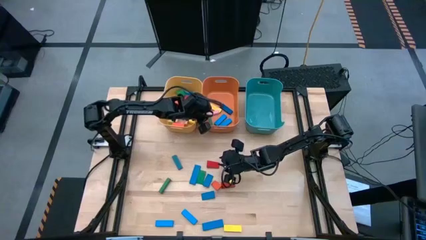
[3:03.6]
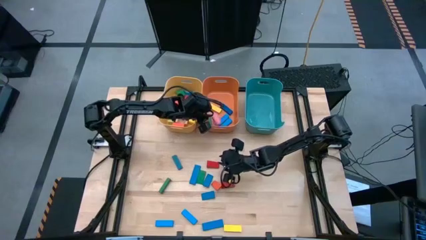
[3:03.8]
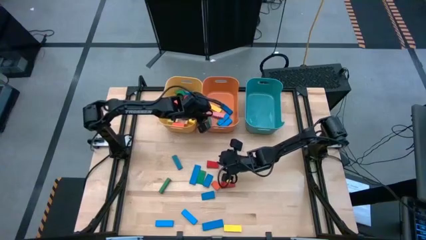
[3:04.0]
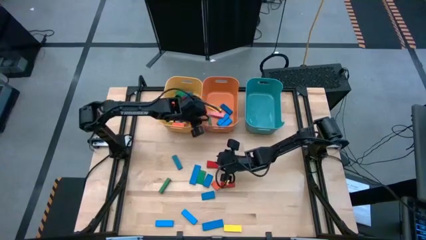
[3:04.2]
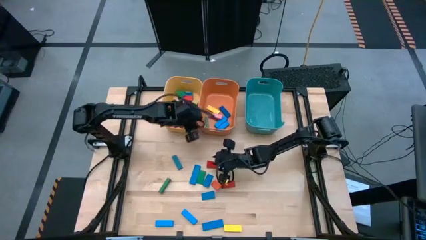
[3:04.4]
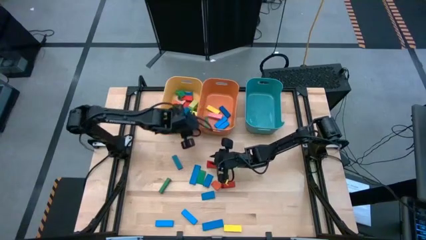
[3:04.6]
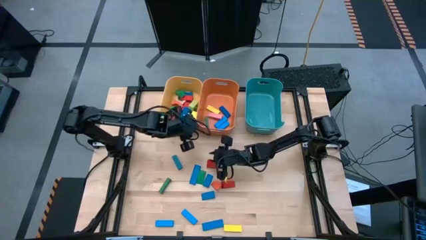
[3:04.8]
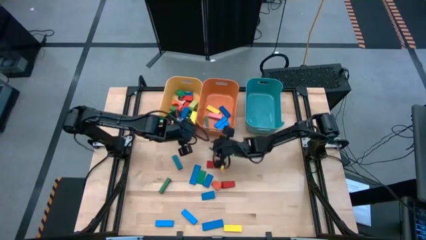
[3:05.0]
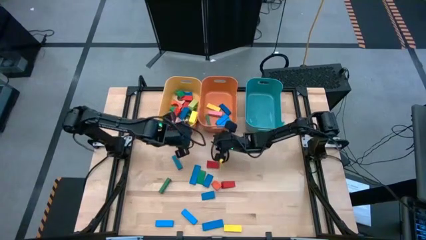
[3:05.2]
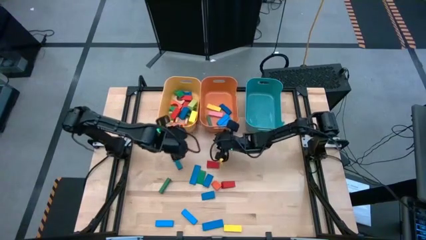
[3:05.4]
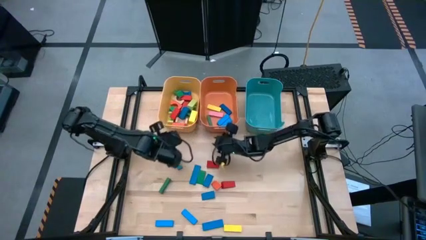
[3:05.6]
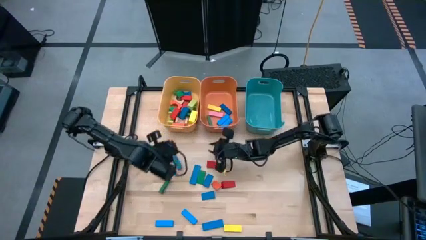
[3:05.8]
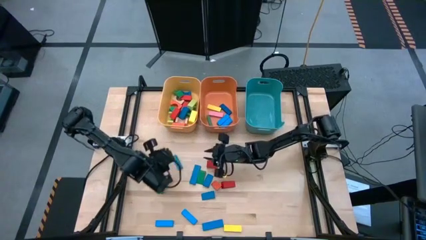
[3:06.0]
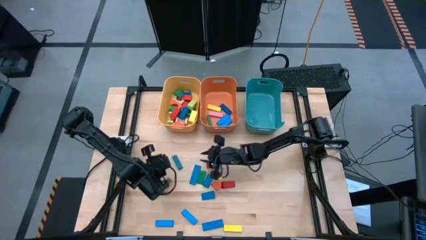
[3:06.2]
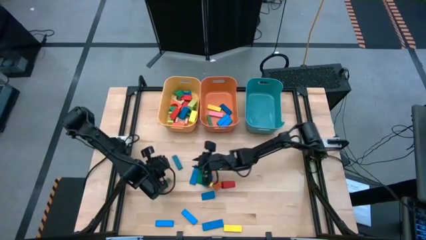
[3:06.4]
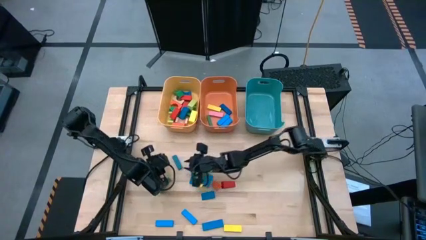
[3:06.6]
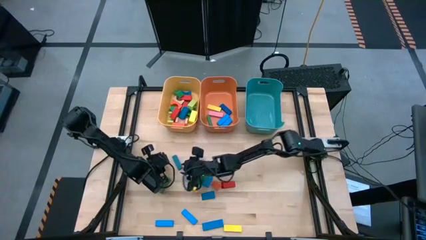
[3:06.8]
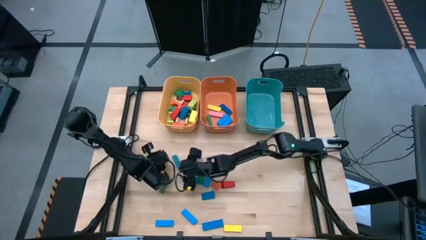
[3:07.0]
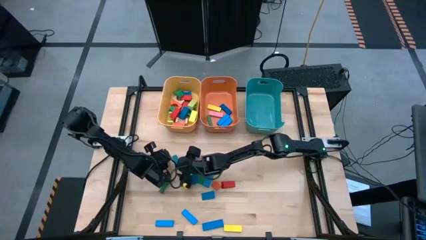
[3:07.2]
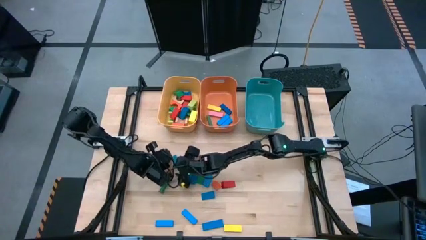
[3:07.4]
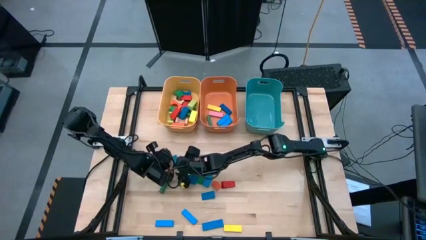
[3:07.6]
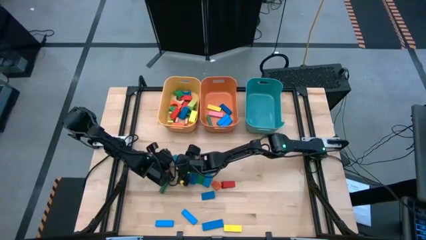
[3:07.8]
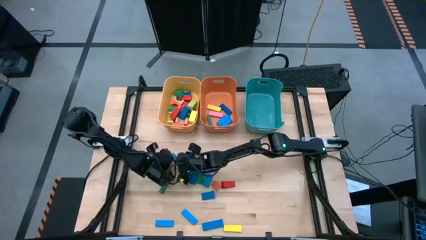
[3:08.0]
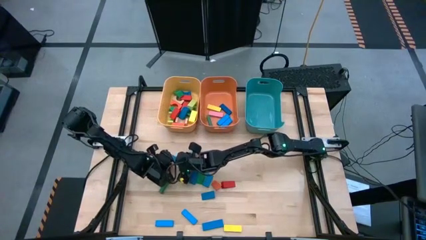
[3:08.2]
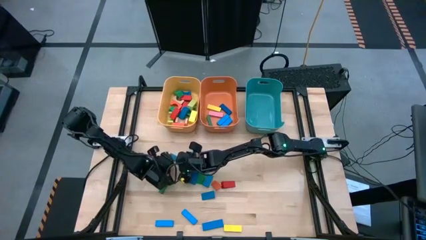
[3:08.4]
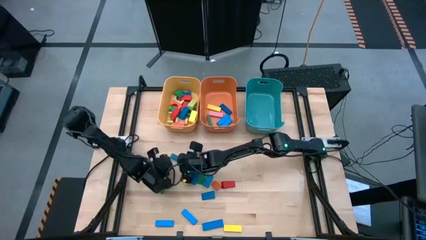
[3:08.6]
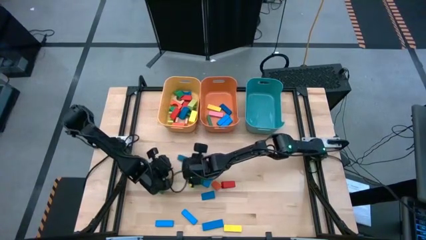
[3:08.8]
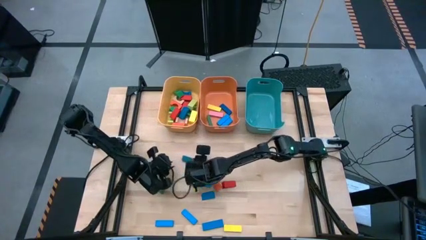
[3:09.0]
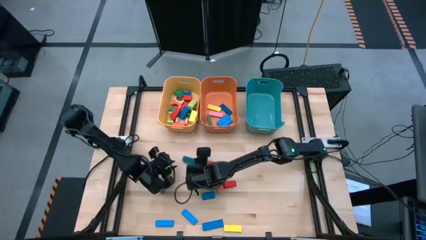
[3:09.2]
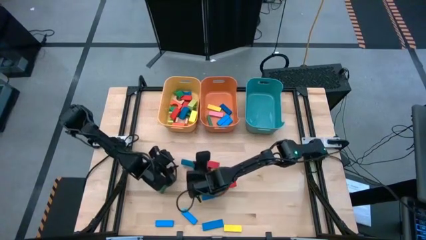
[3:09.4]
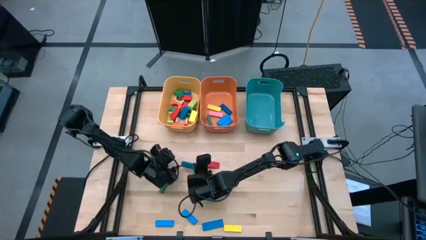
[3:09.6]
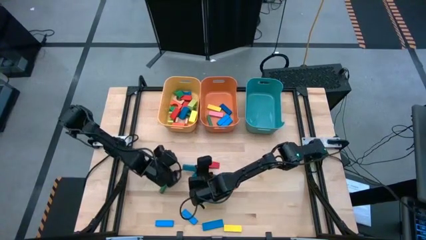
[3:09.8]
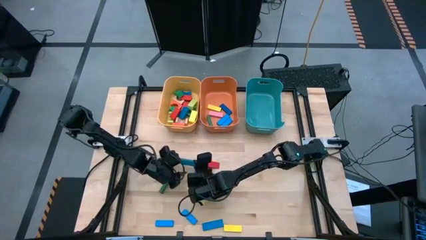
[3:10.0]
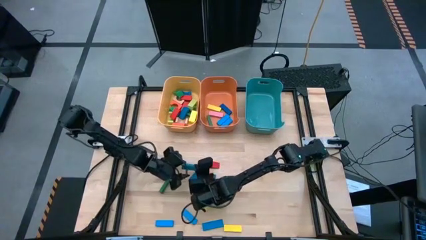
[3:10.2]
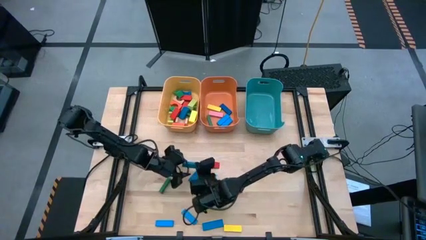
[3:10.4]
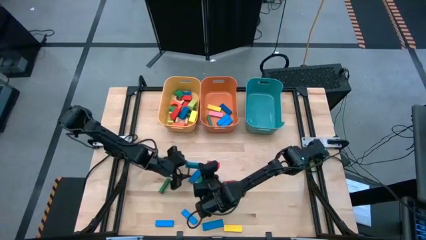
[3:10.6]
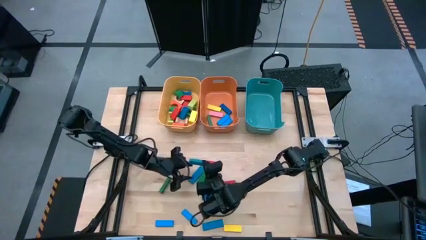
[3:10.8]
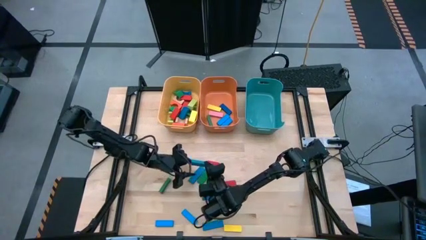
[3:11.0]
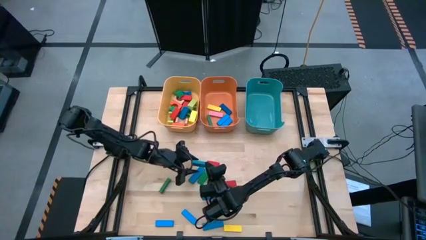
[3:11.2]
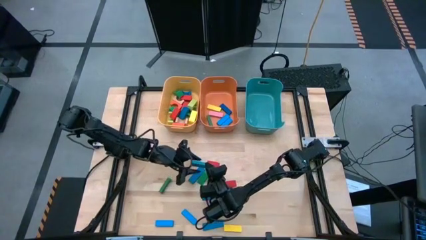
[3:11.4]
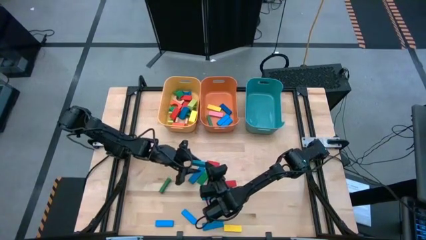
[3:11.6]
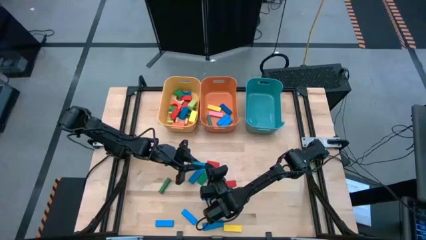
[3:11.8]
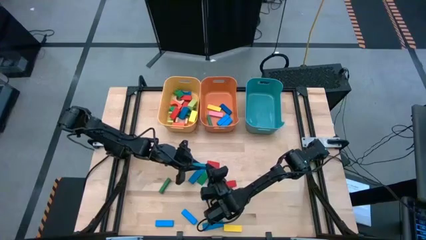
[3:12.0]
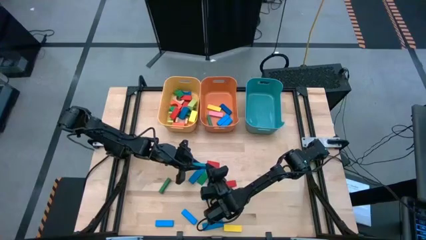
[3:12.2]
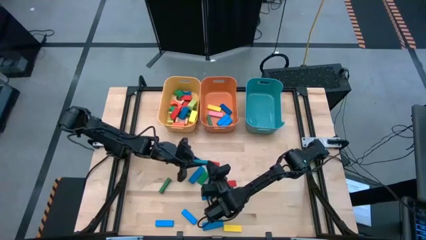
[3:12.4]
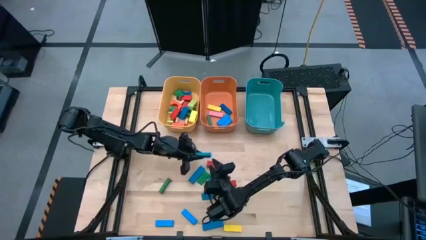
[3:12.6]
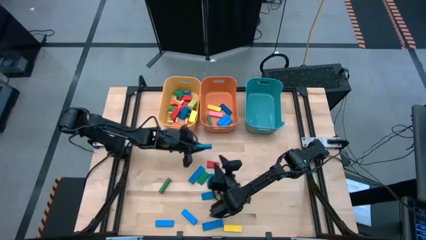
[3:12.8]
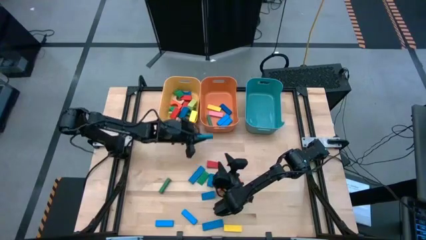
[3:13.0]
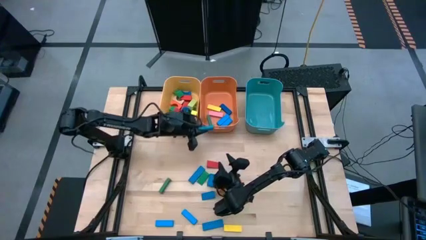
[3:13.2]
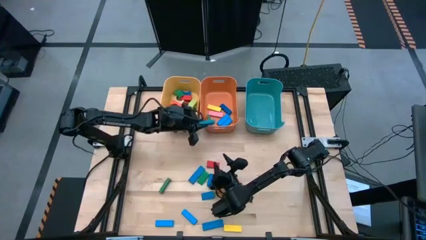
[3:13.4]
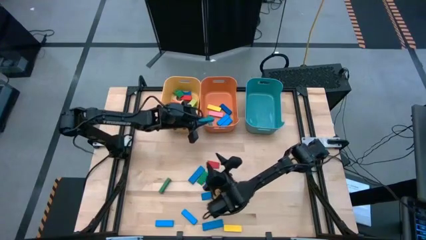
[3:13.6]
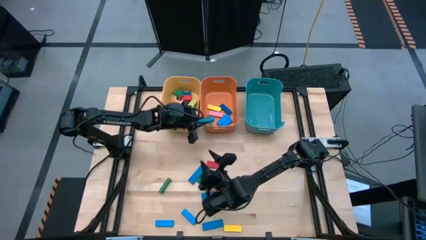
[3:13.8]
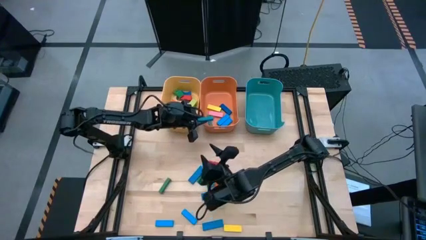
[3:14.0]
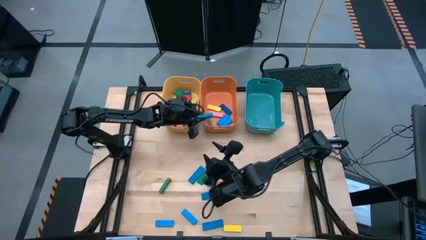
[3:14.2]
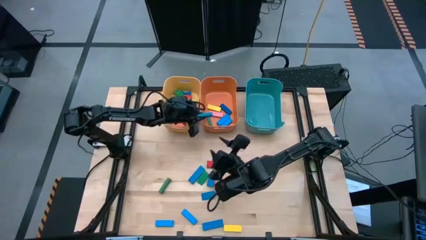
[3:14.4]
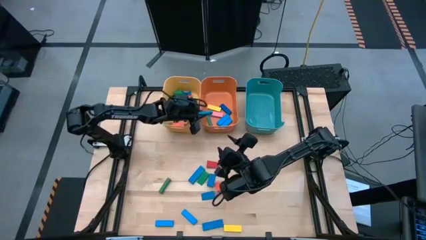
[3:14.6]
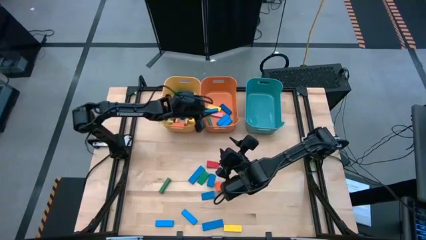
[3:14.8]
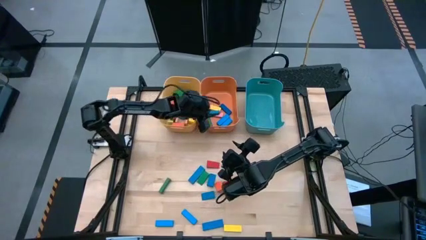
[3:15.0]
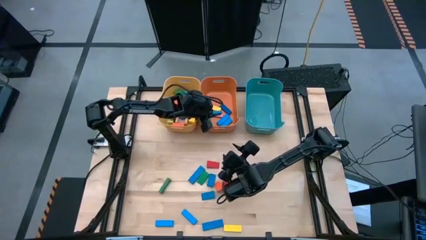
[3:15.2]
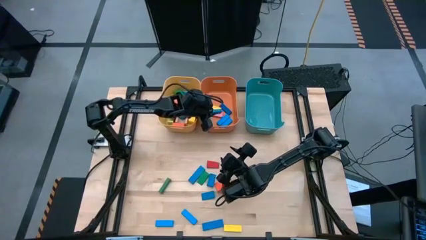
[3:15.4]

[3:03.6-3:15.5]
Task: Sort blocks by size
Put the blue rectangle block into the orange bin

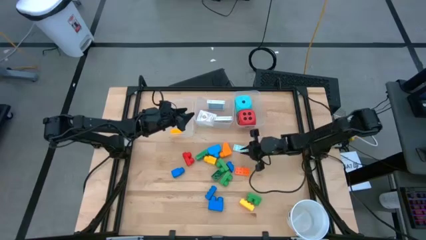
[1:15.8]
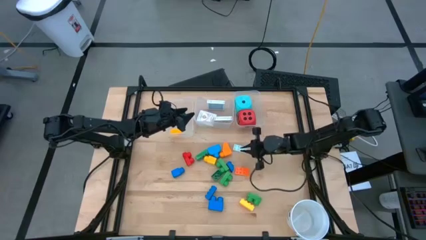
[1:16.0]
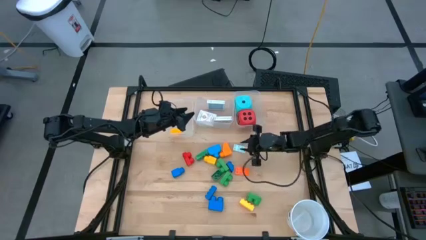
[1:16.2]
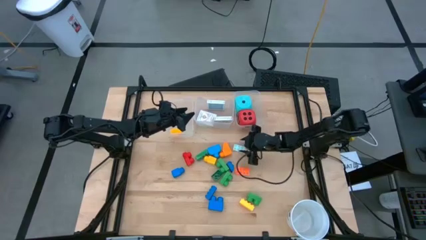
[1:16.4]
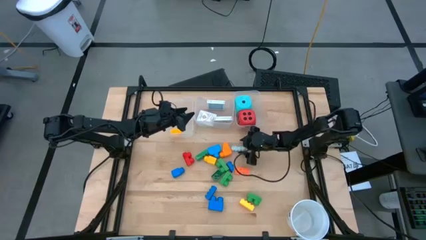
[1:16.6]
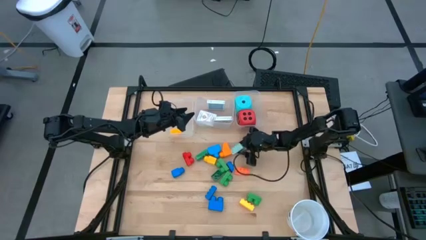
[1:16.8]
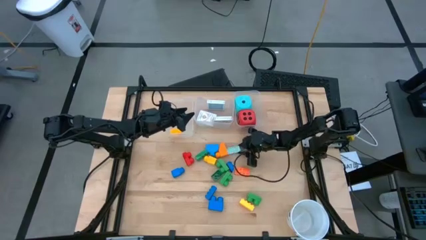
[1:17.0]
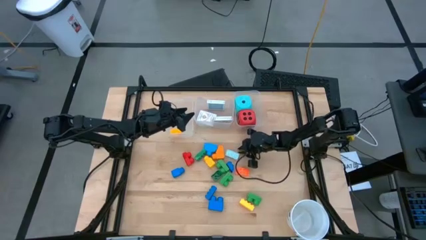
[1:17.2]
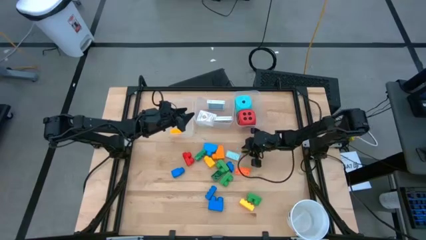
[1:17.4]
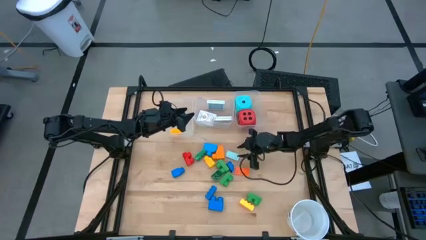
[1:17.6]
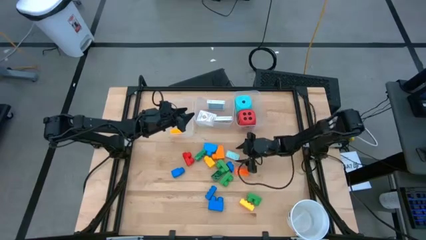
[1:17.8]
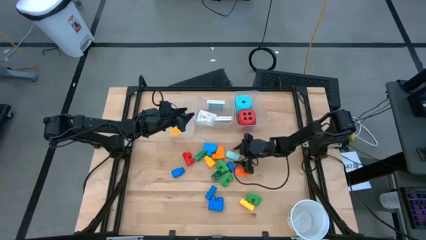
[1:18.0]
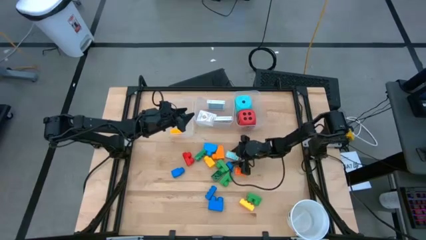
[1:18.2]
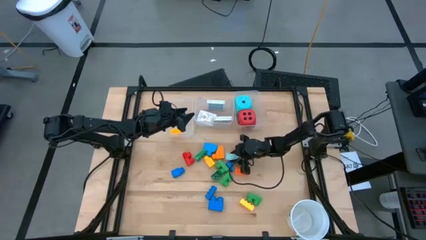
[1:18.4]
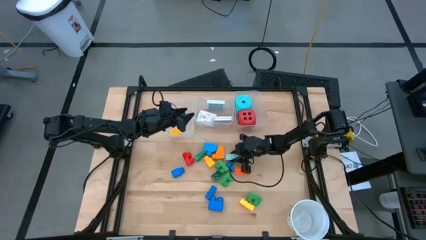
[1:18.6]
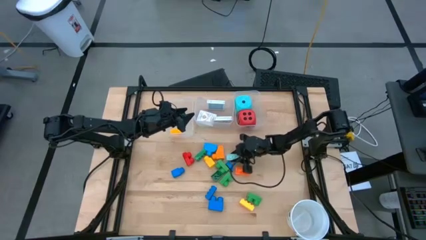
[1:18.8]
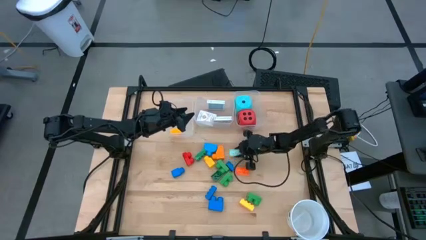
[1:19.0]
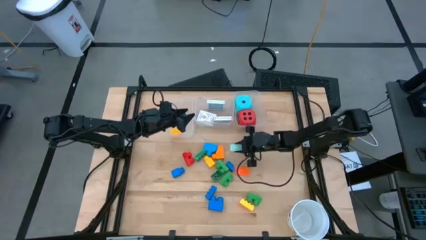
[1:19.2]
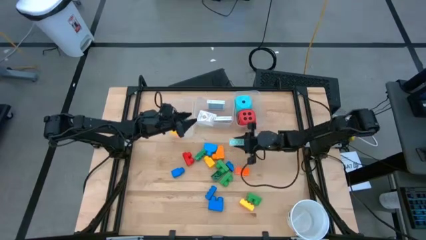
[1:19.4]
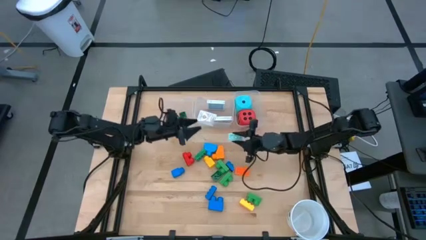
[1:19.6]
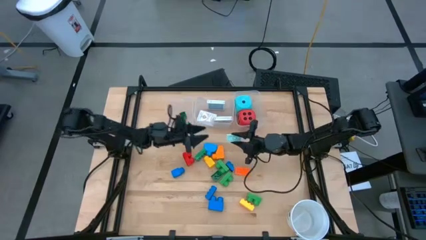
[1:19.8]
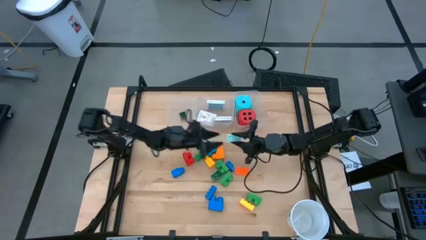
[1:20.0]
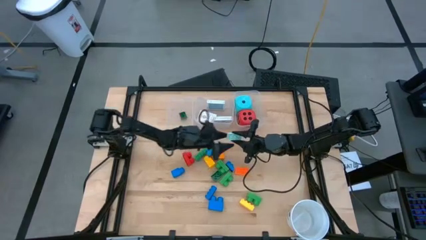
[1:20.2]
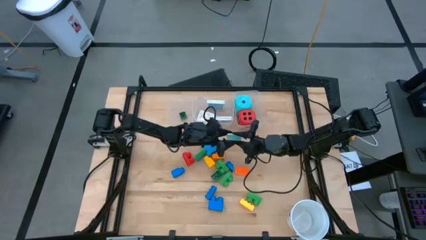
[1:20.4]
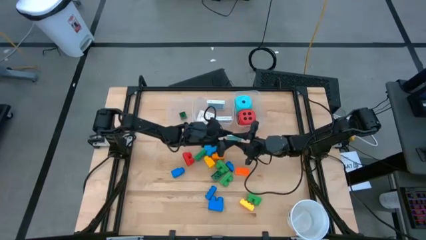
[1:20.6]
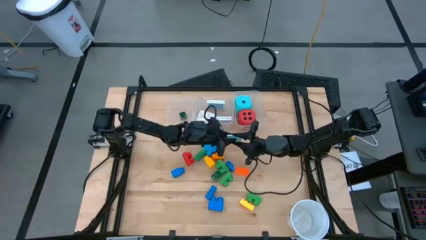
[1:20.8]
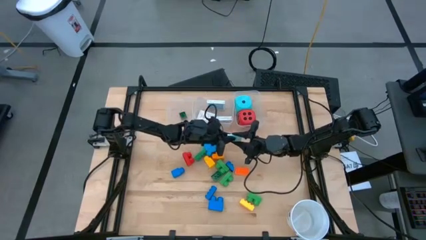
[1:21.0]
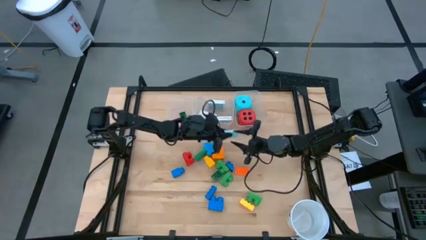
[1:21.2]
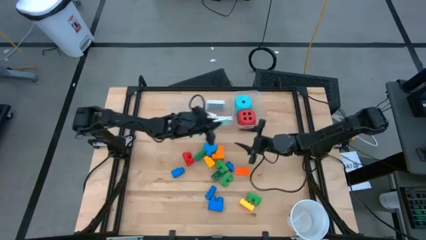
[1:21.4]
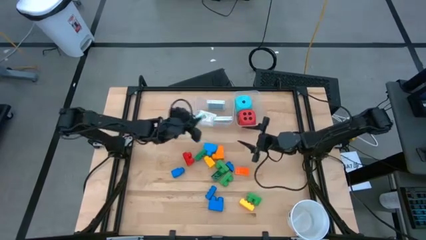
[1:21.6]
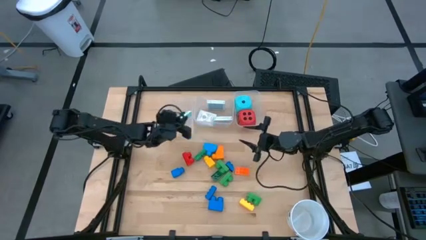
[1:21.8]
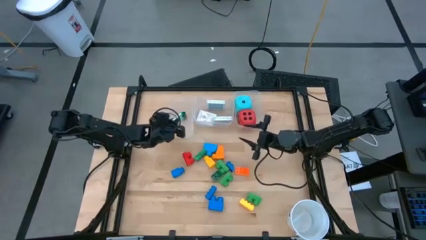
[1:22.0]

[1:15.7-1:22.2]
Task: Pick & Place Toys
Put the light blue game piece into the left transparent bin
